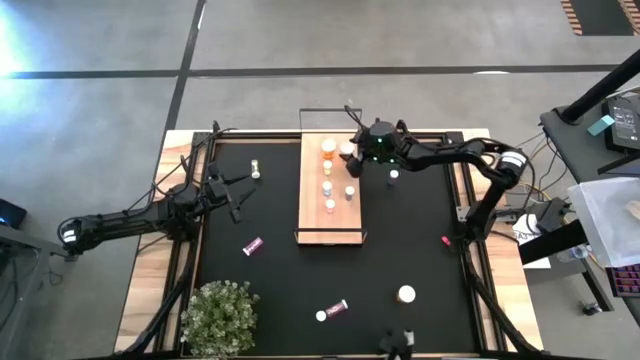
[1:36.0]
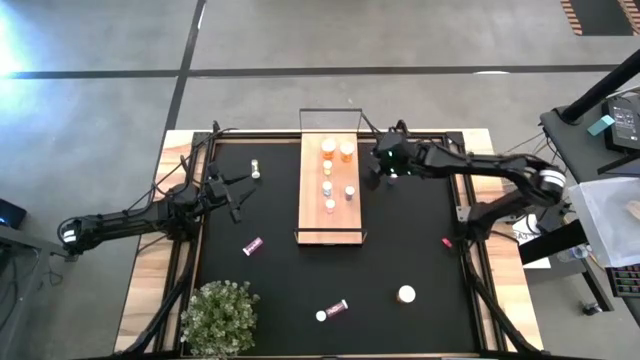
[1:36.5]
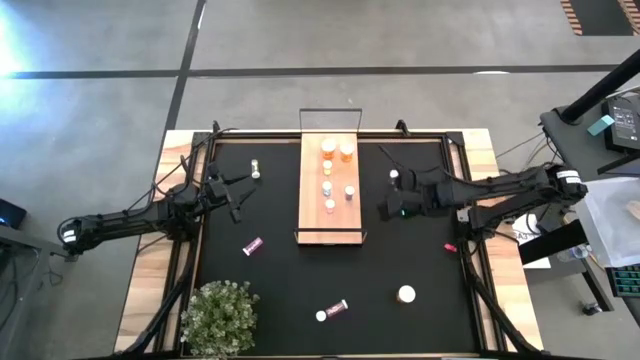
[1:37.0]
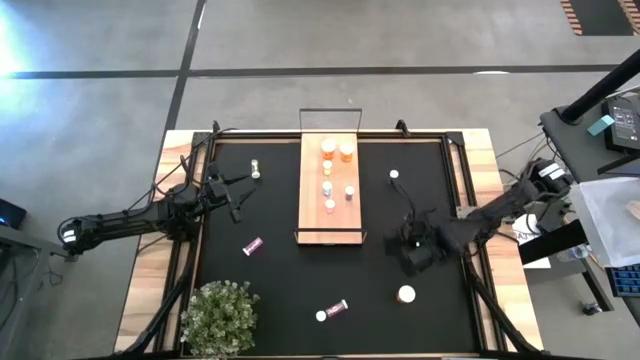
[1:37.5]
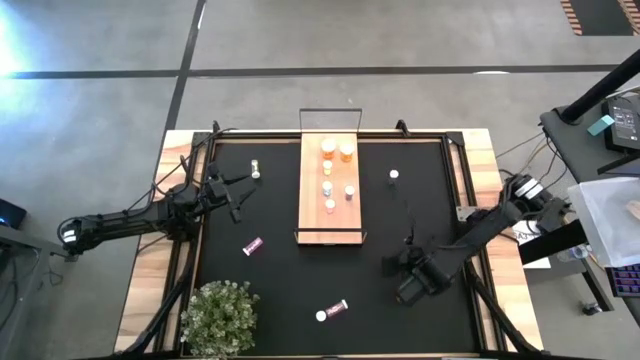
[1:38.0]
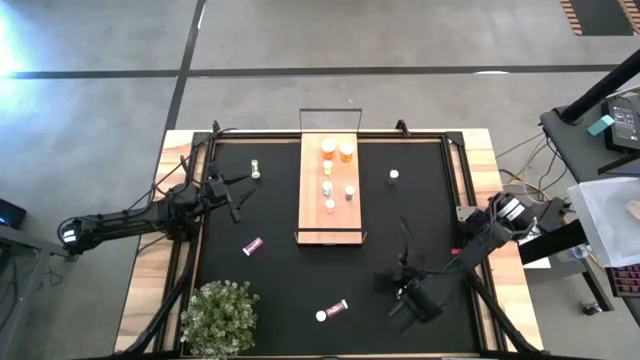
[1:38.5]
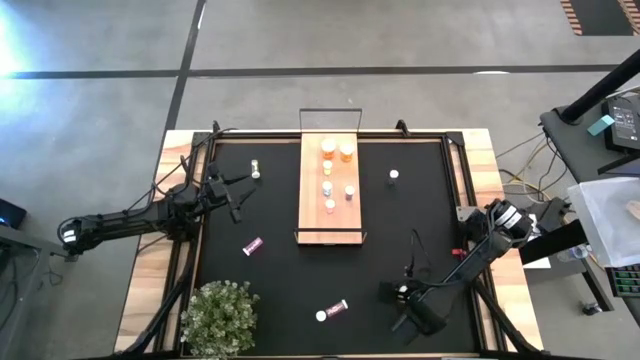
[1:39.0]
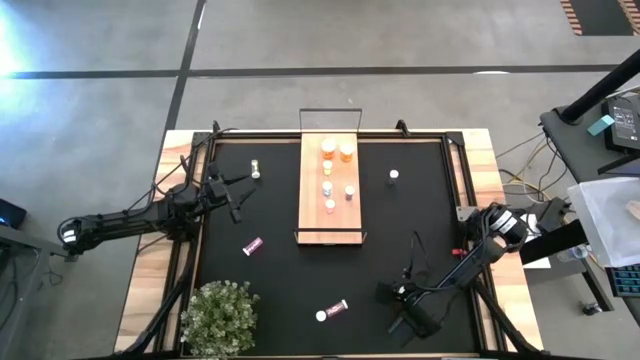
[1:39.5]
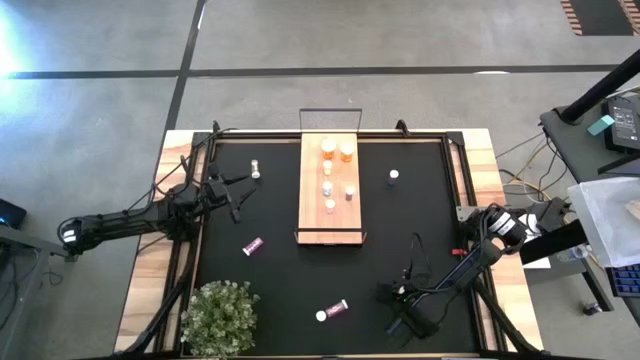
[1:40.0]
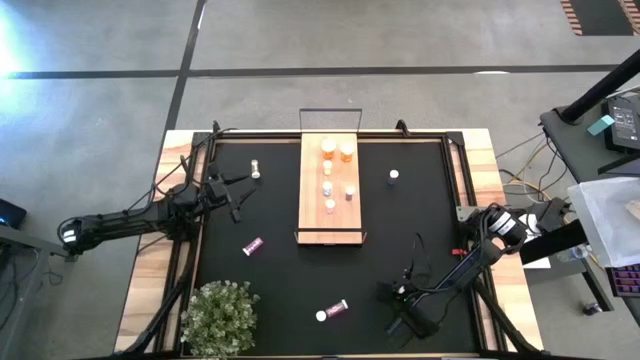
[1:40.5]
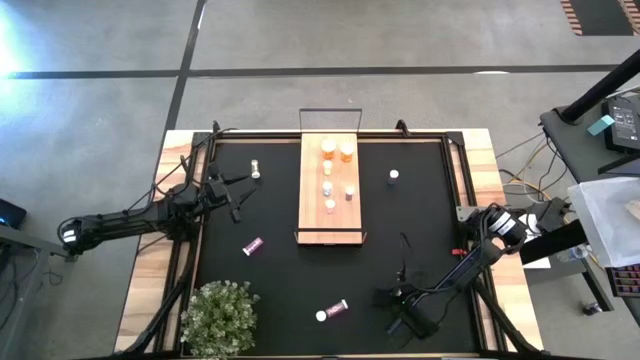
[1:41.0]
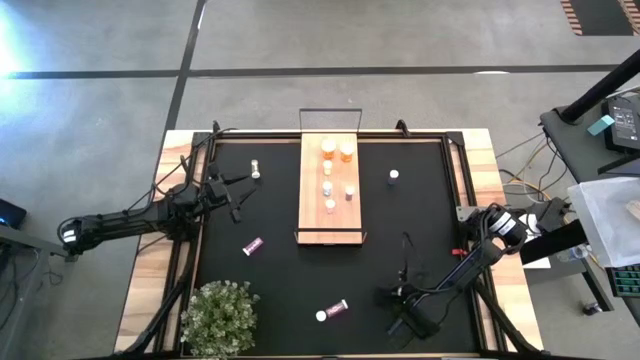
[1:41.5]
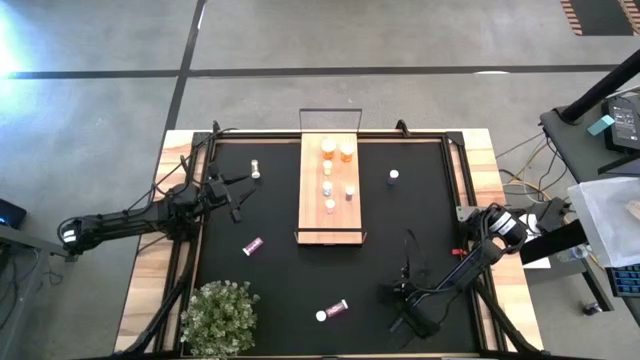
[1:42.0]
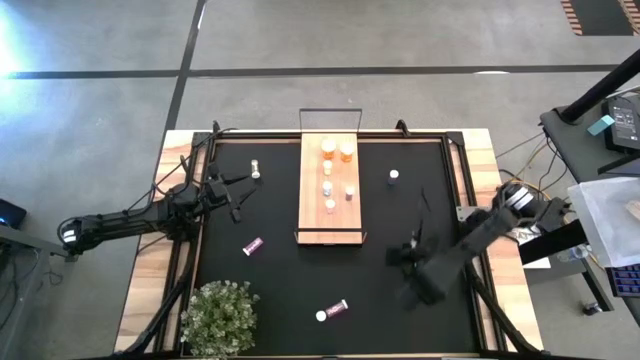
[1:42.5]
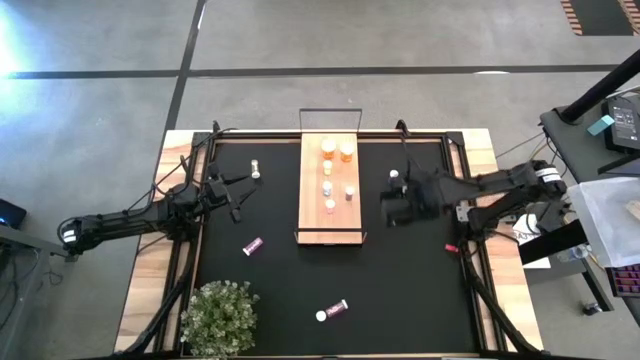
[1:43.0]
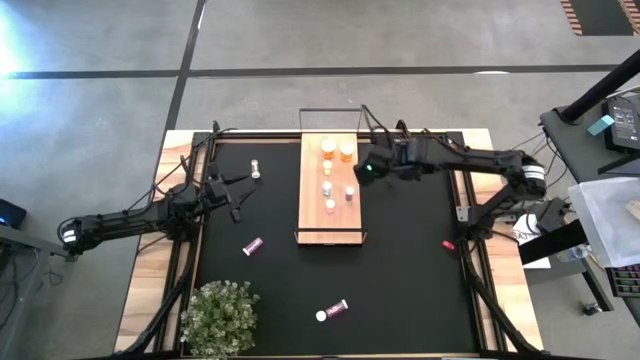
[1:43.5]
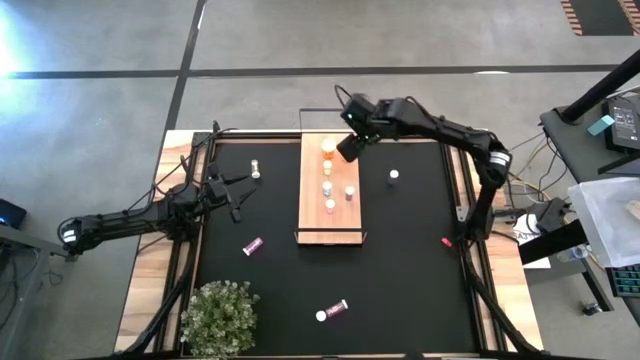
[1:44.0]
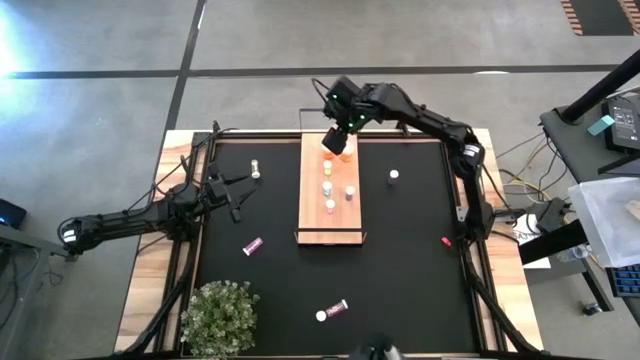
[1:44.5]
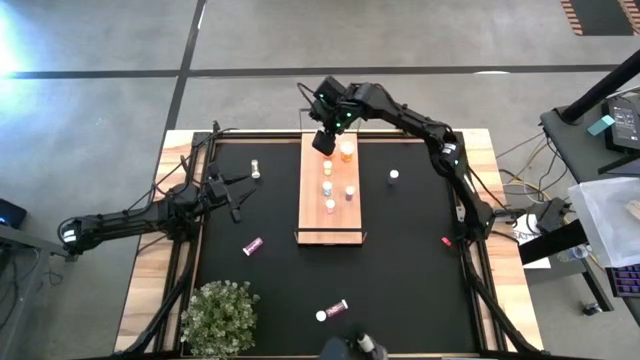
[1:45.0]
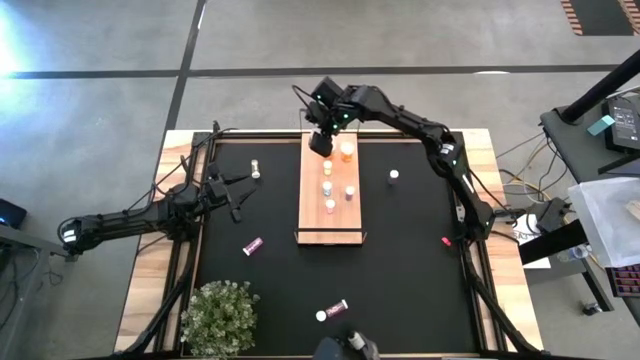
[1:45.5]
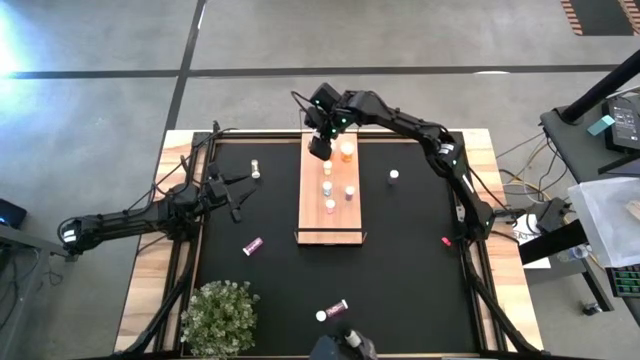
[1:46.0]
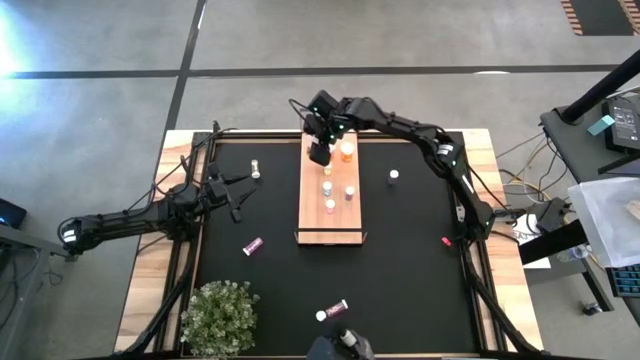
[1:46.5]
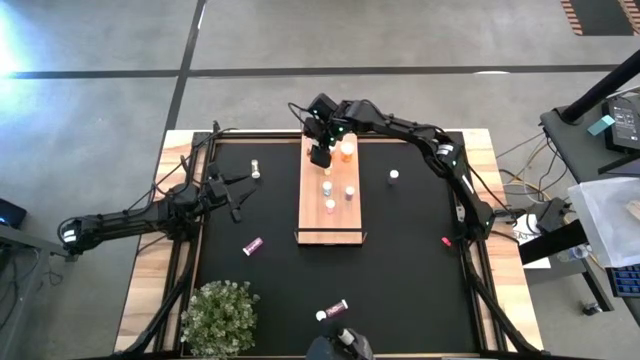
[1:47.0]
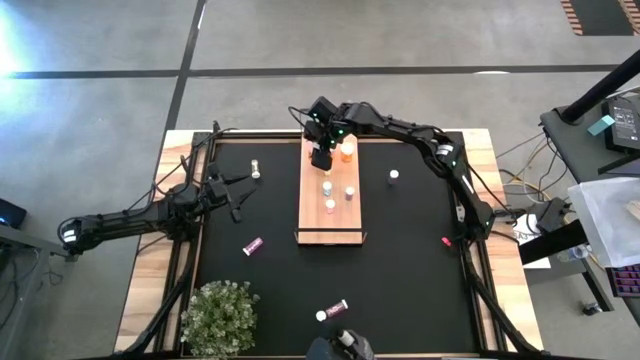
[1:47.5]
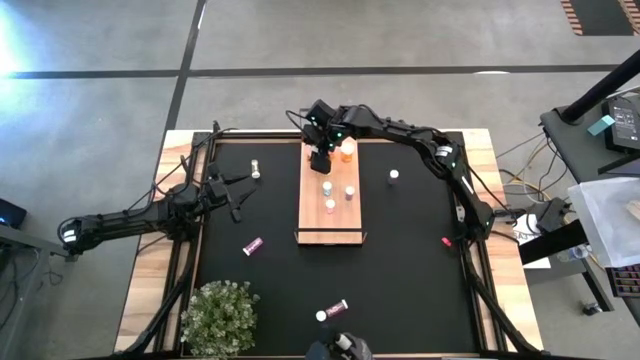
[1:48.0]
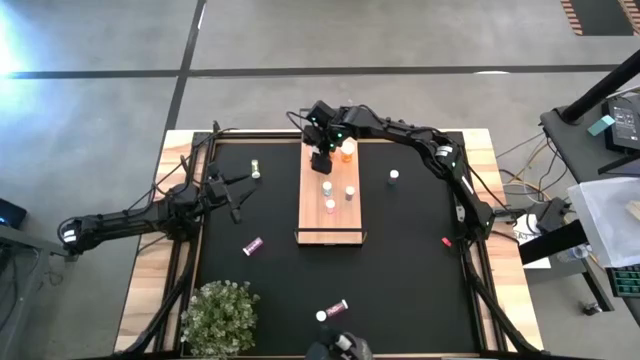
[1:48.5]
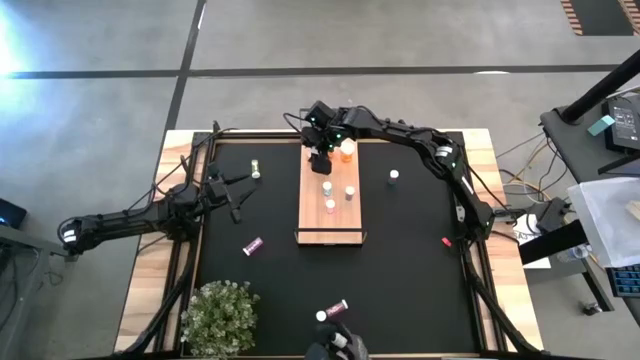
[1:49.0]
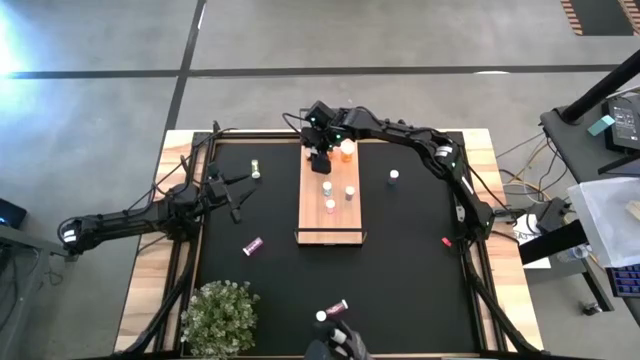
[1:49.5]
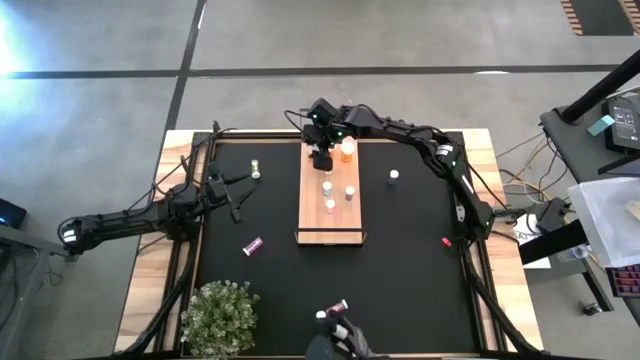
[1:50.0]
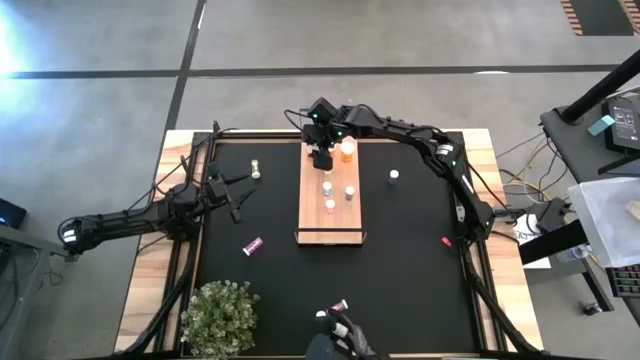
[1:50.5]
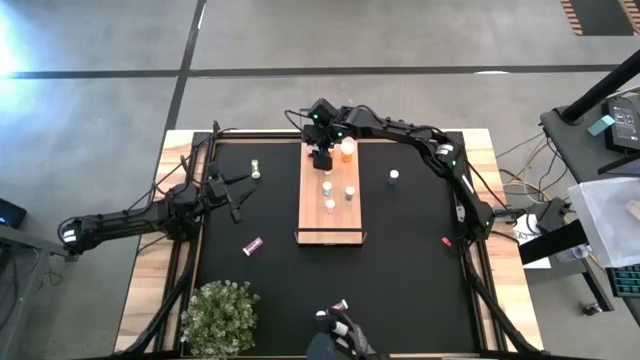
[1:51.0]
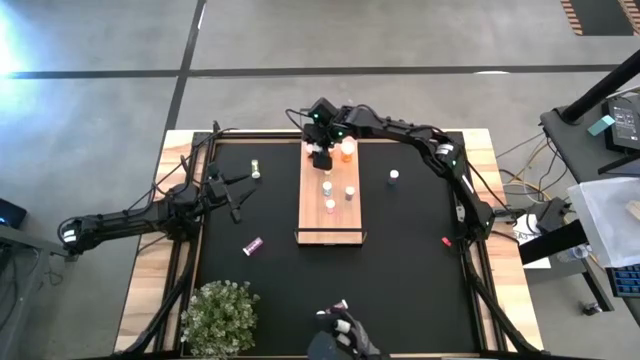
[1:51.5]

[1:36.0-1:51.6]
Task: Pick and place medicine bottles onto shelf by color
Put the orange medicine bottle on the shelf aligned with the other orange medicine bottles

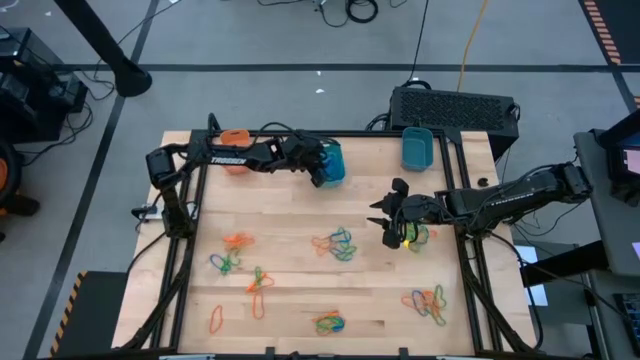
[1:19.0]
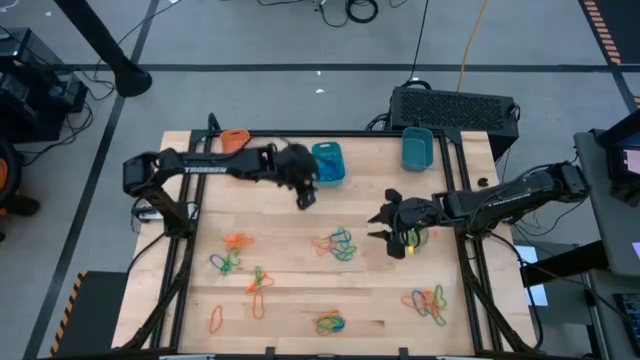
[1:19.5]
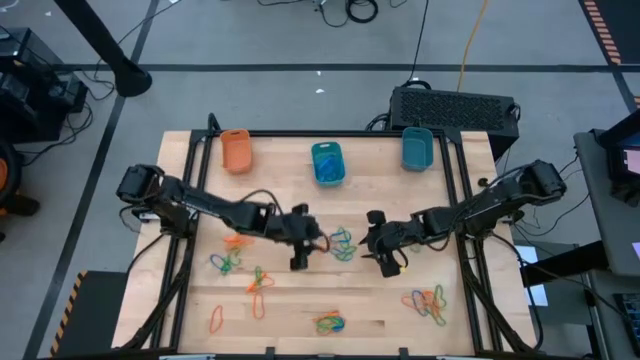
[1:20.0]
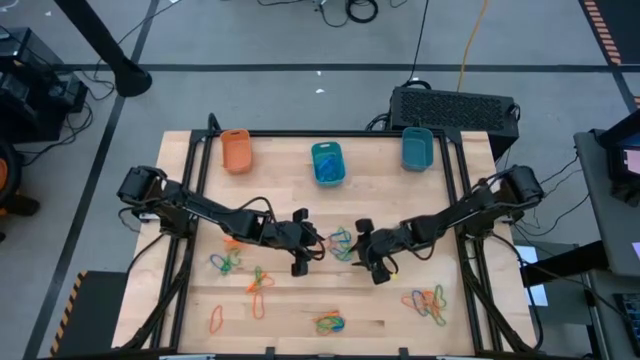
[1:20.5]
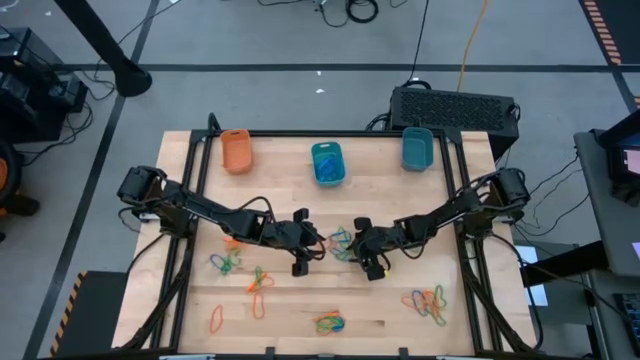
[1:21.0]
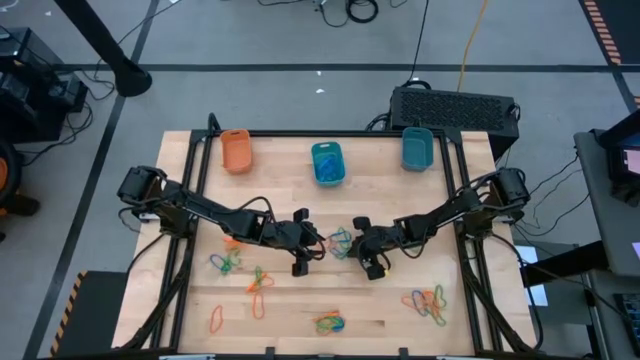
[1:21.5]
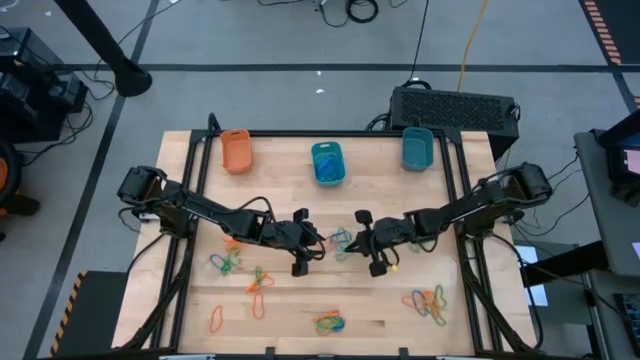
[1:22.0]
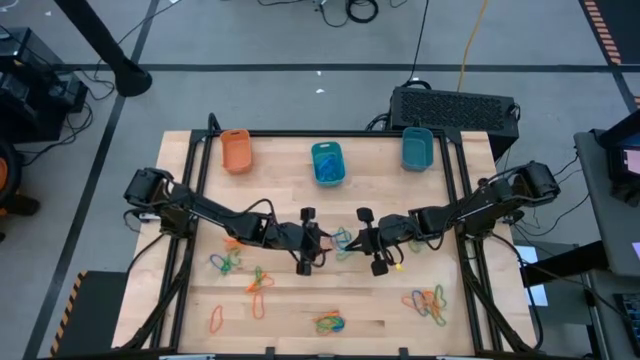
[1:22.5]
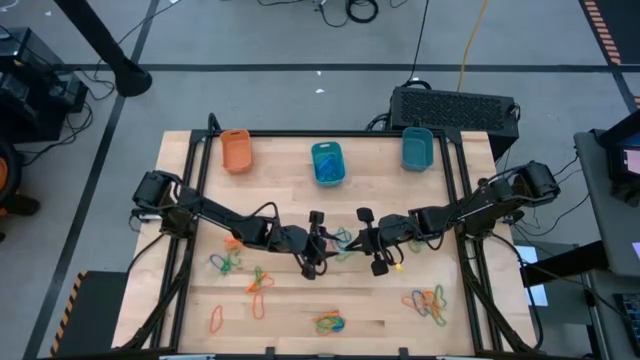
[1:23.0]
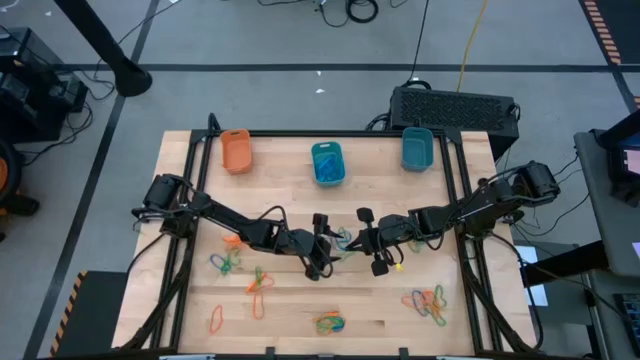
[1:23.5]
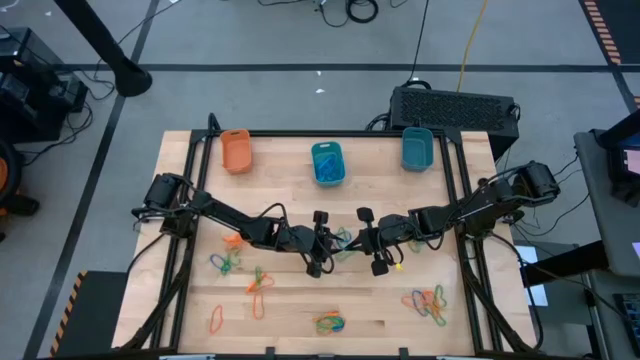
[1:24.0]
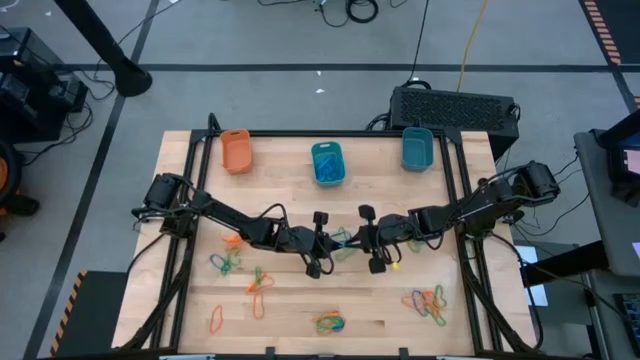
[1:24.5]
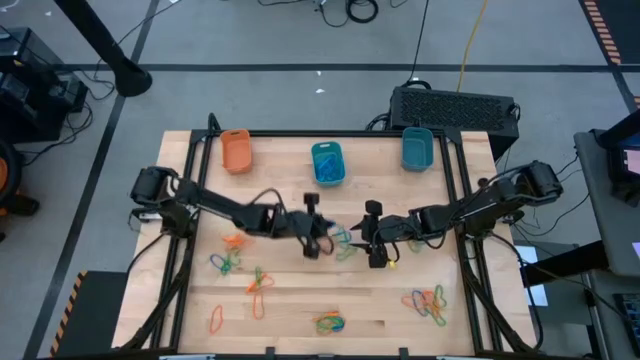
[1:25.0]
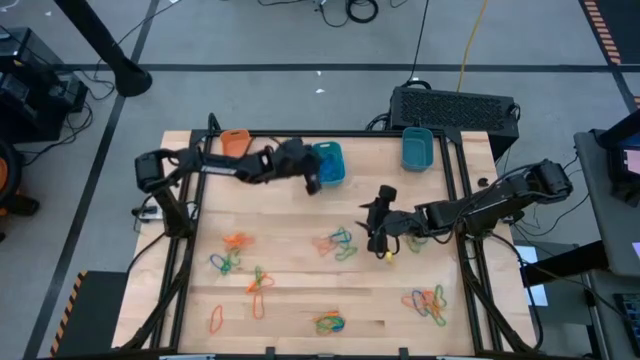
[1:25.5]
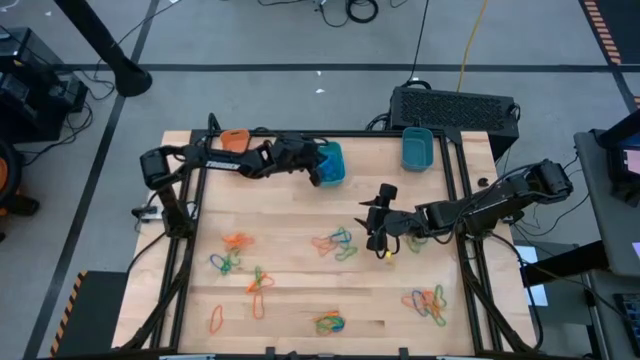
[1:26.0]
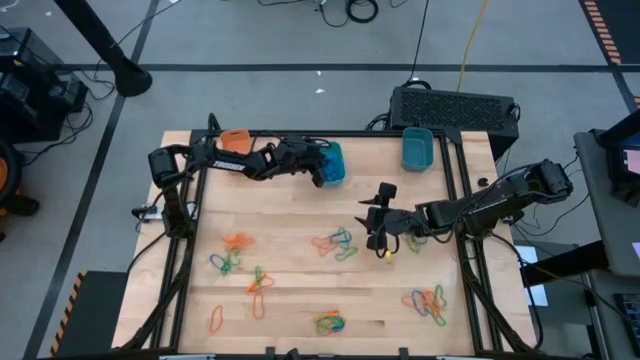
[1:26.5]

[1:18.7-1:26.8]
Task: Sort rubber bands into baskets
Put the blue rubber band into the light blue bin
